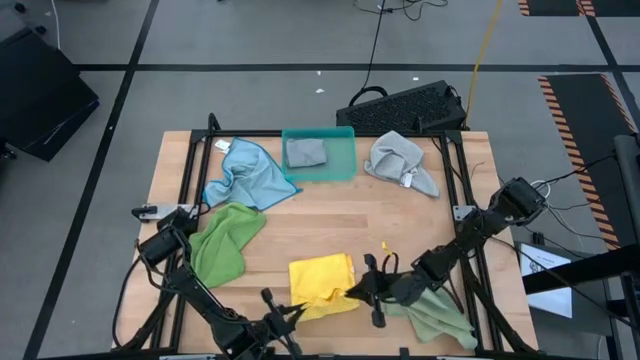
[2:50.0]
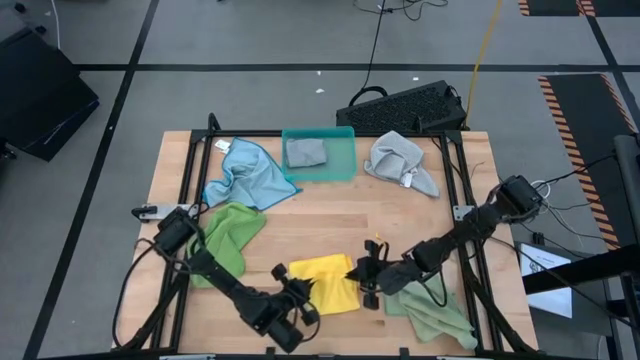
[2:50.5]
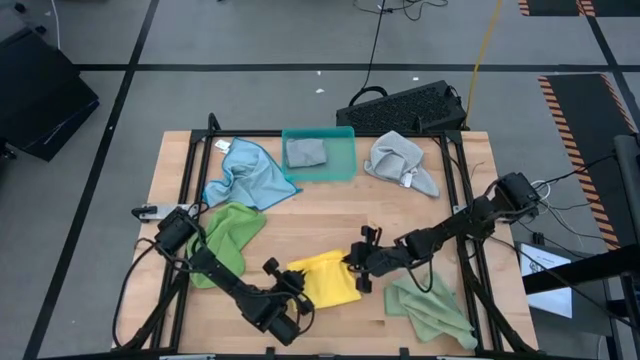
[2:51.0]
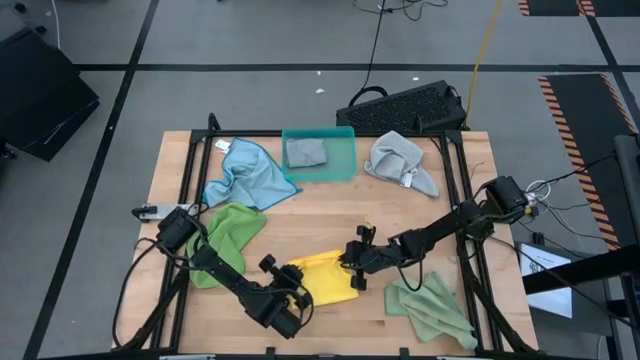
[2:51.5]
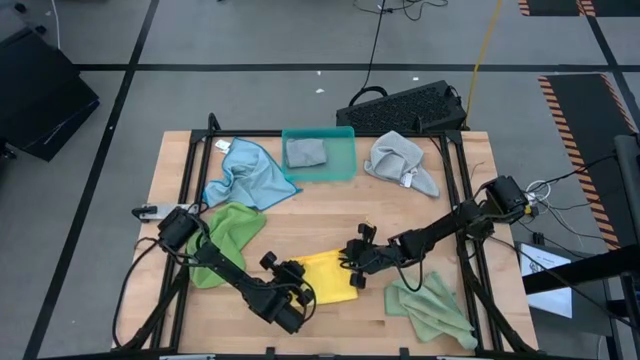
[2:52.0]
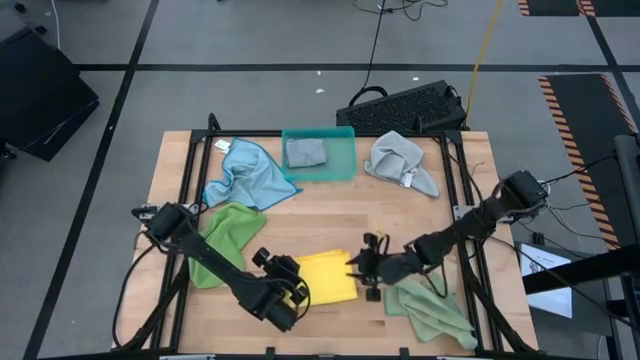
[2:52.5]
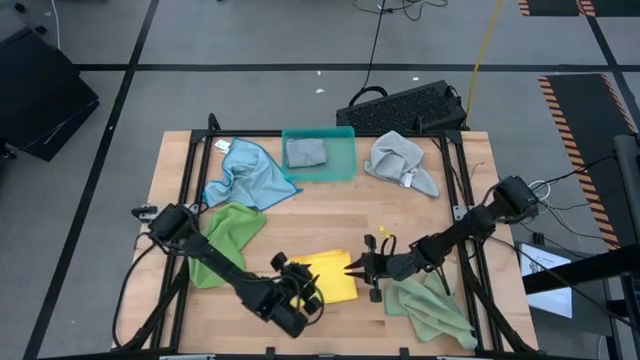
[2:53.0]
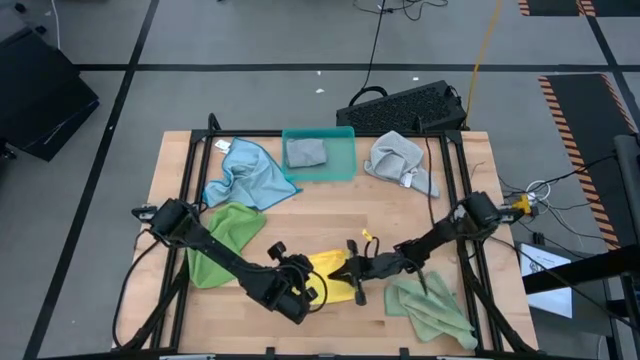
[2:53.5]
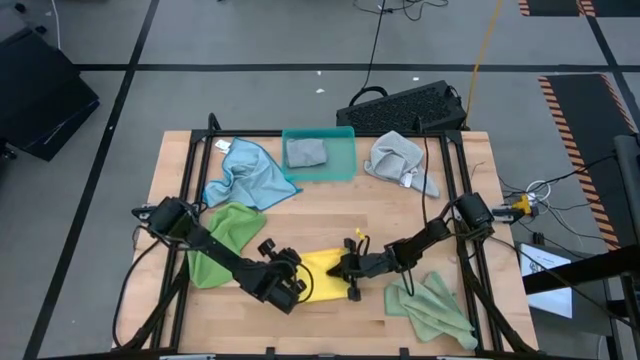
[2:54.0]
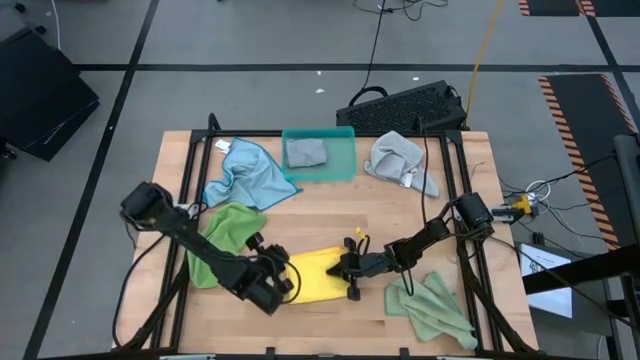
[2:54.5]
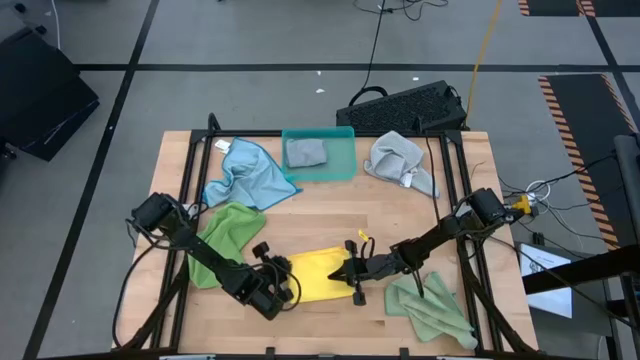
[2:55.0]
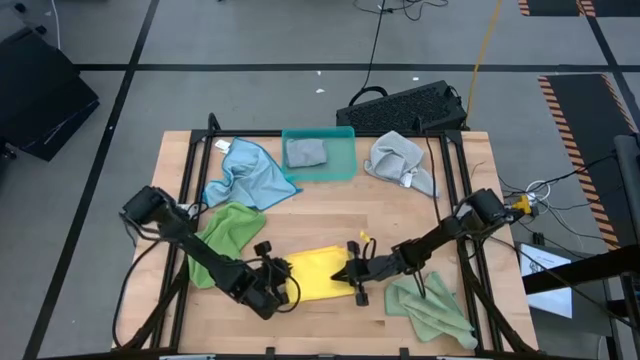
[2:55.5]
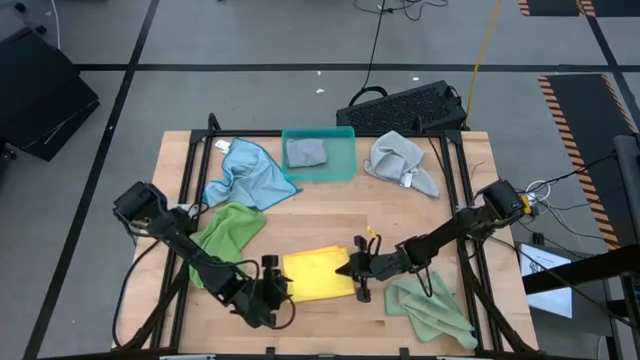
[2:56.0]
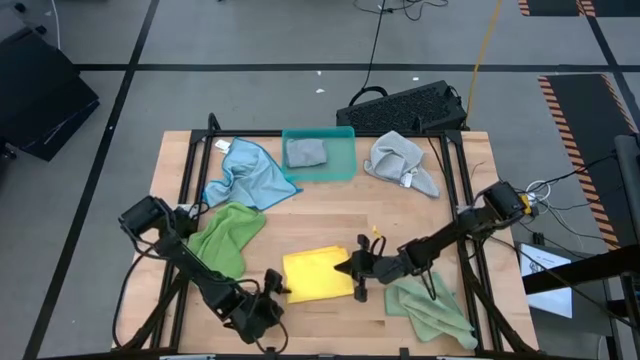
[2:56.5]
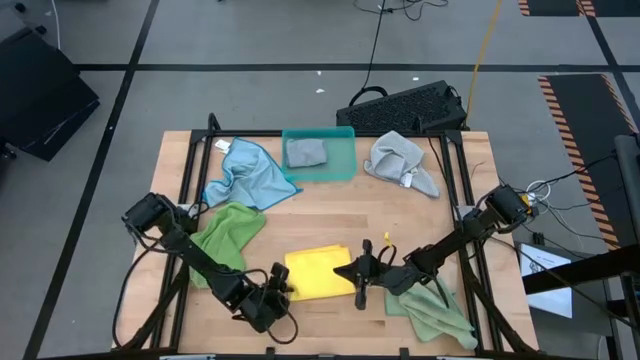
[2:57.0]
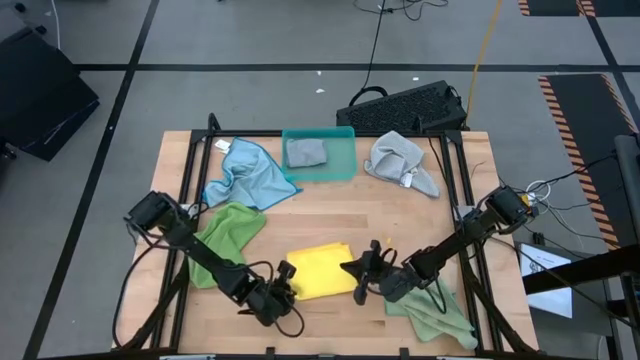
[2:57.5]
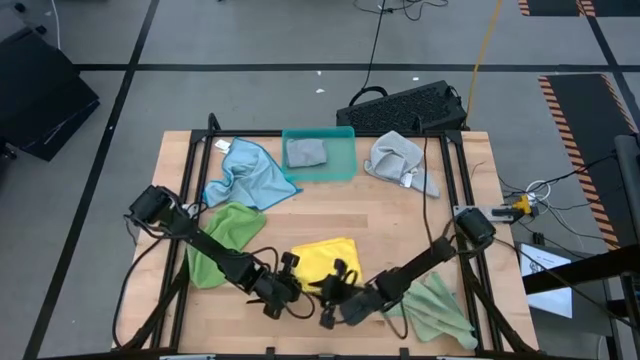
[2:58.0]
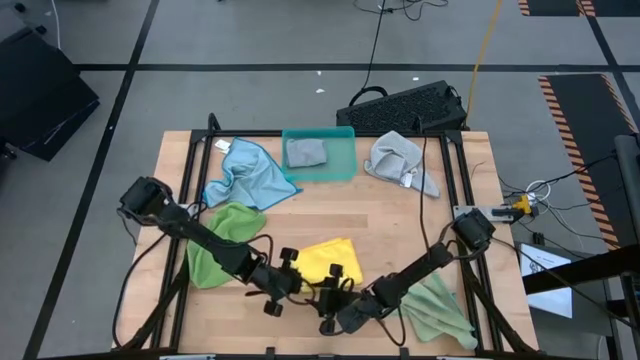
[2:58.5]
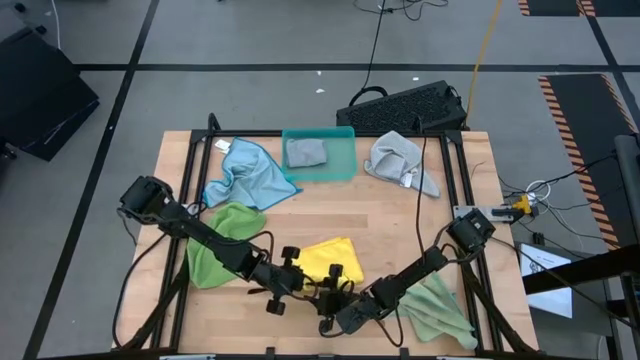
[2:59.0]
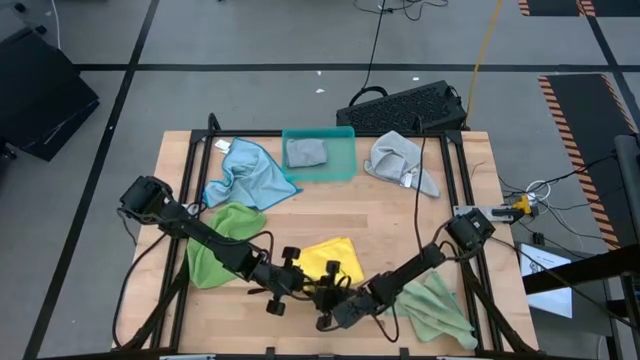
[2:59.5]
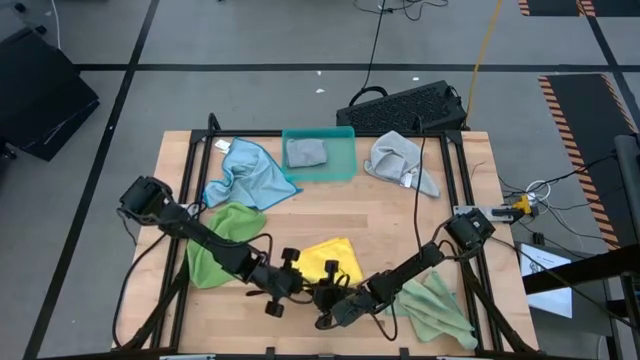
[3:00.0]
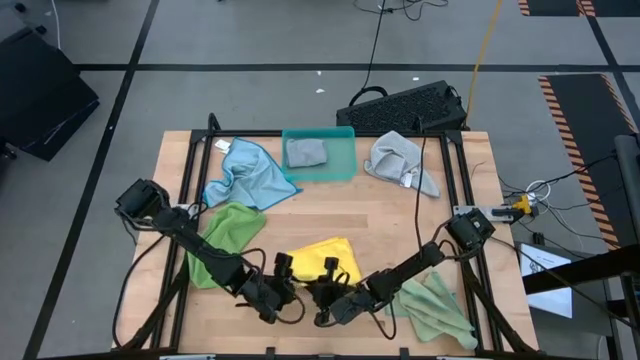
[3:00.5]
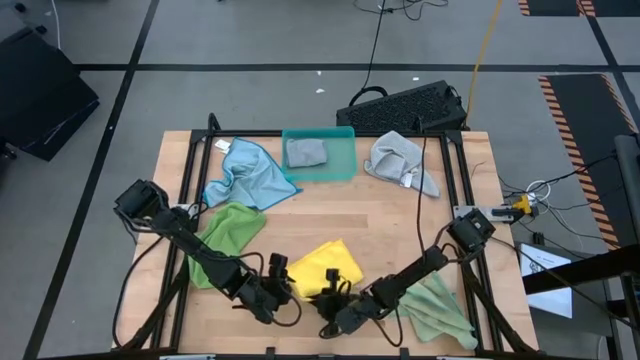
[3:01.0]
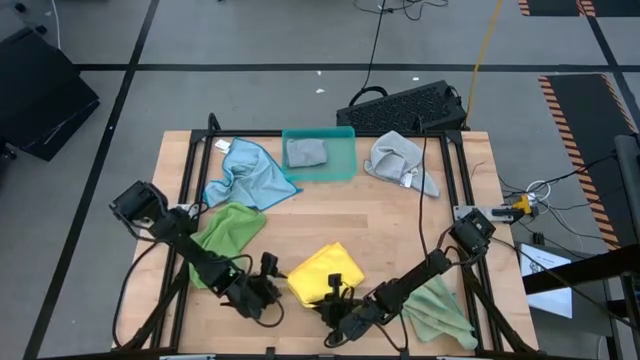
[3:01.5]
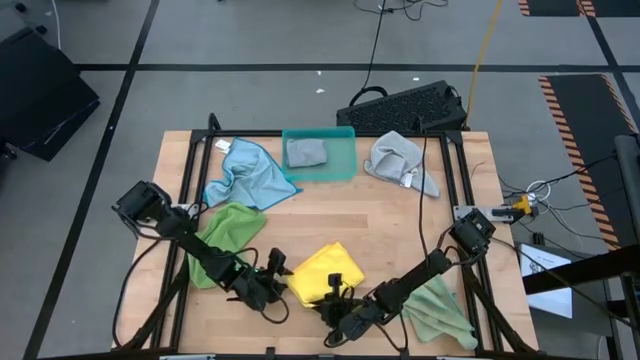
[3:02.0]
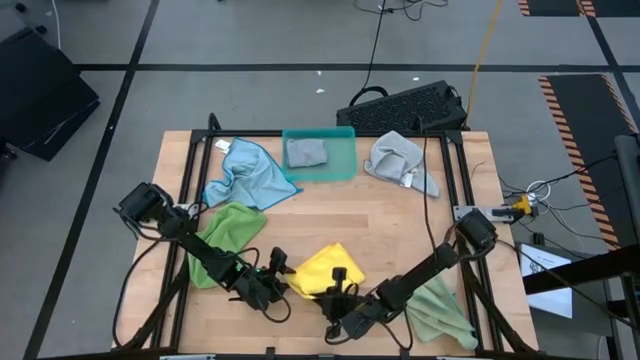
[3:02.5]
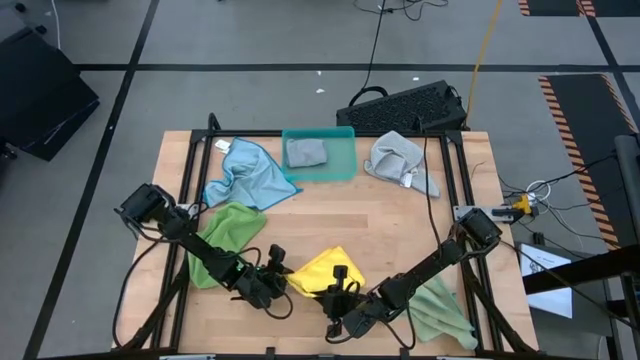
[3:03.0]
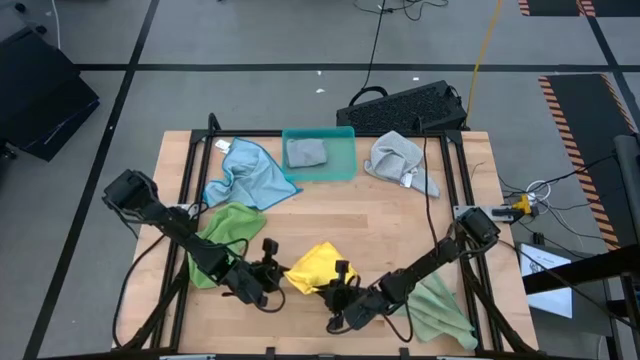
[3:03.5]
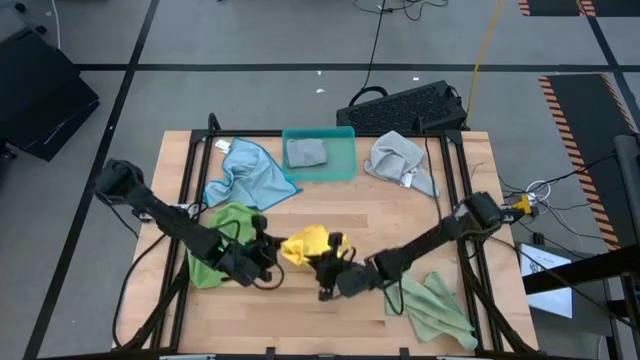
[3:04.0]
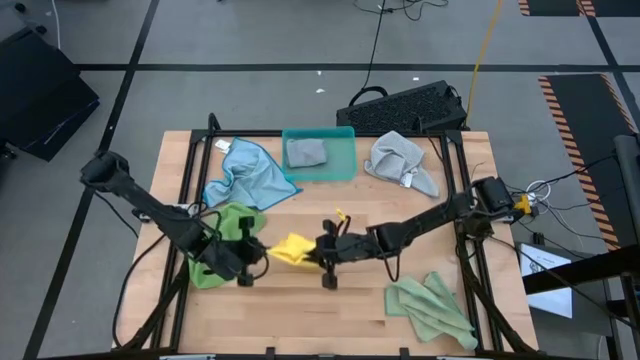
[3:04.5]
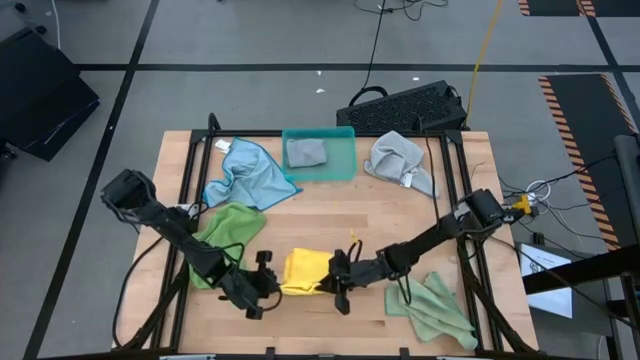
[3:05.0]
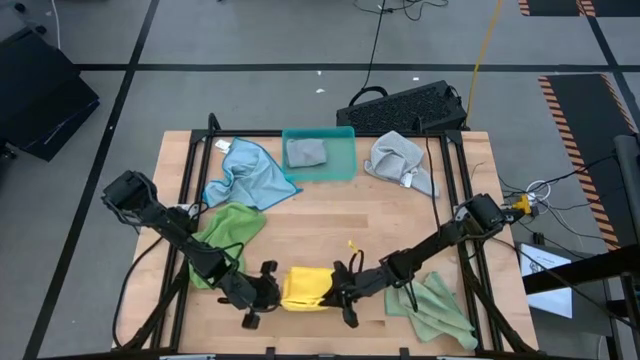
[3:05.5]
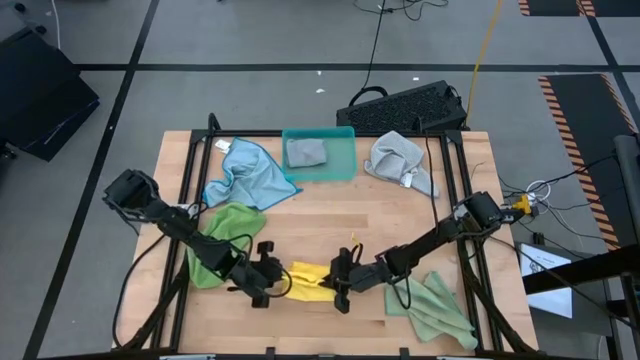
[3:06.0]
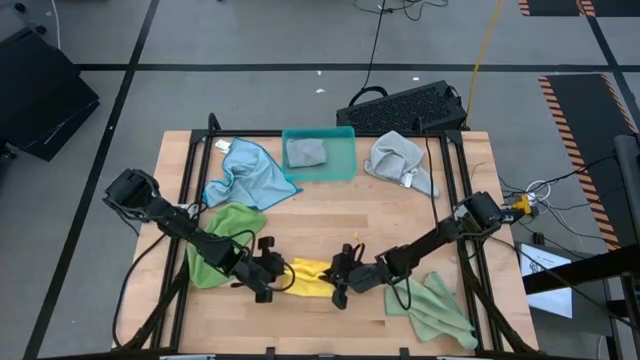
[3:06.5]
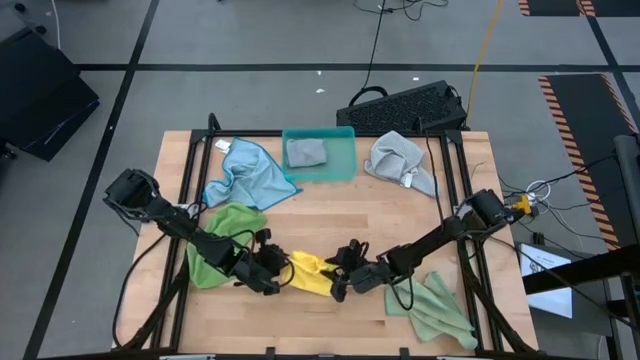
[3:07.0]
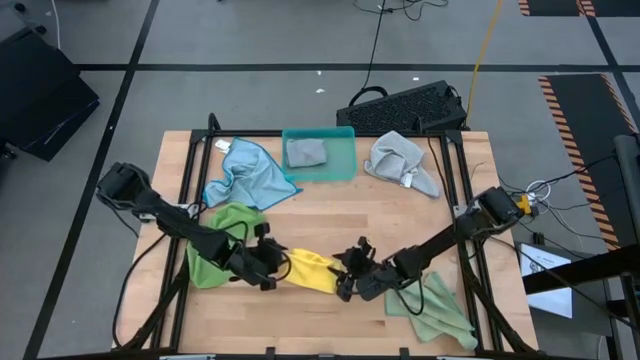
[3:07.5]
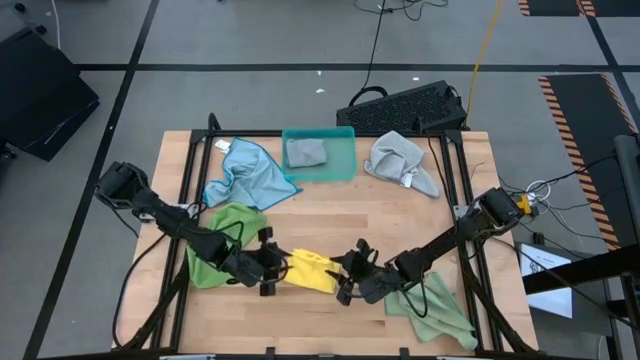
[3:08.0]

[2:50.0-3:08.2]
Task: Fold microfiber towels
Fold the yellow microfiber cloth

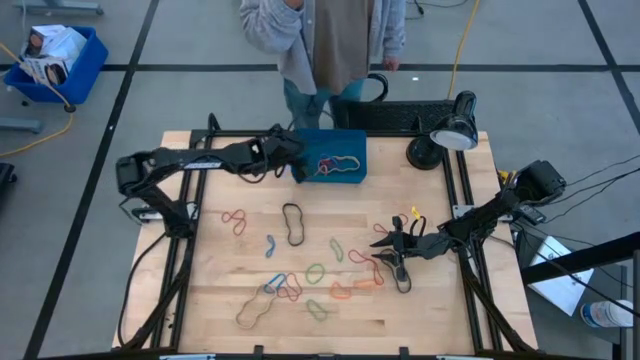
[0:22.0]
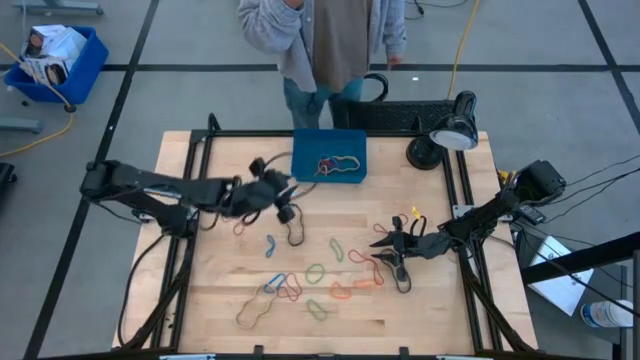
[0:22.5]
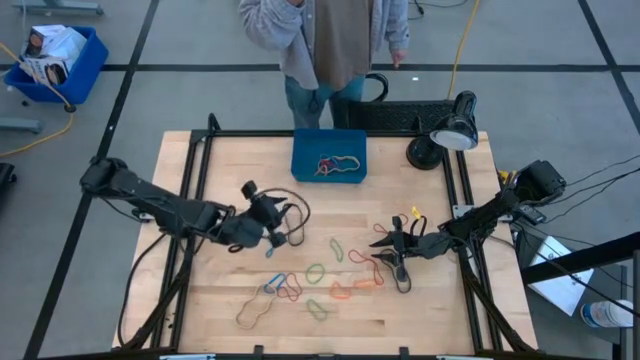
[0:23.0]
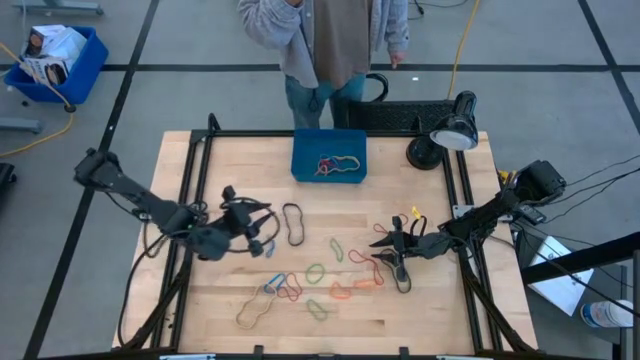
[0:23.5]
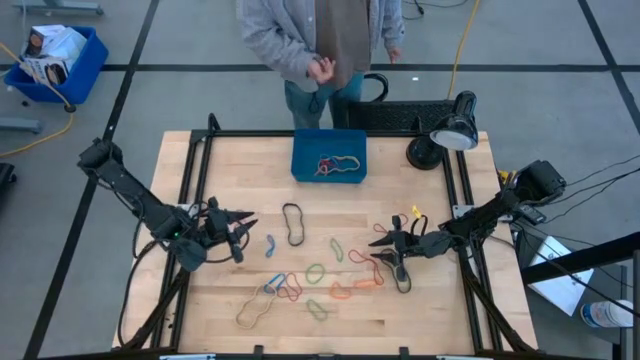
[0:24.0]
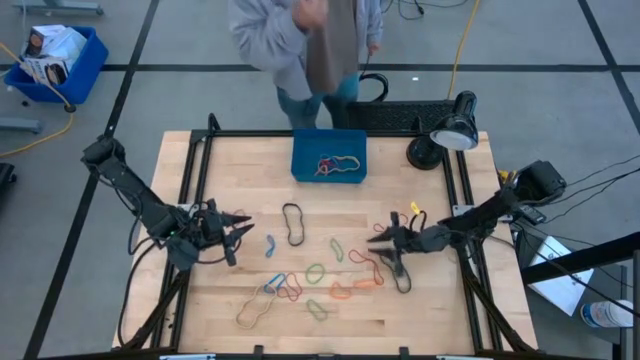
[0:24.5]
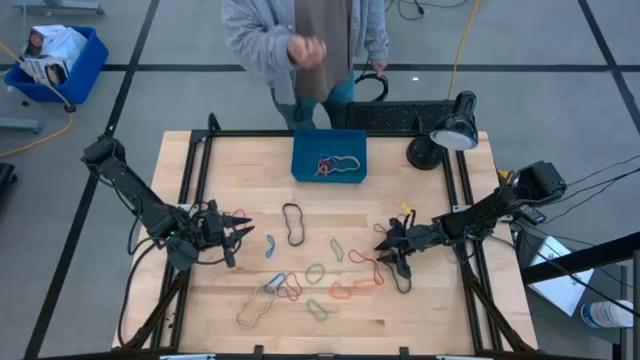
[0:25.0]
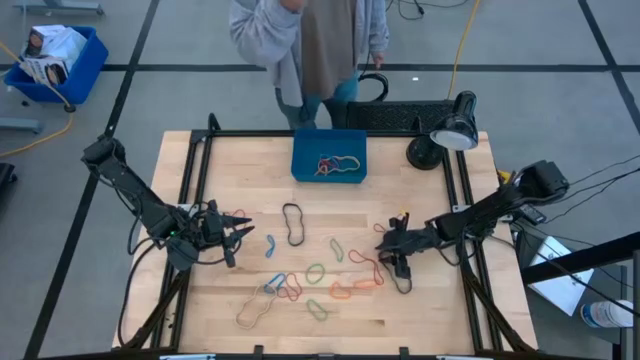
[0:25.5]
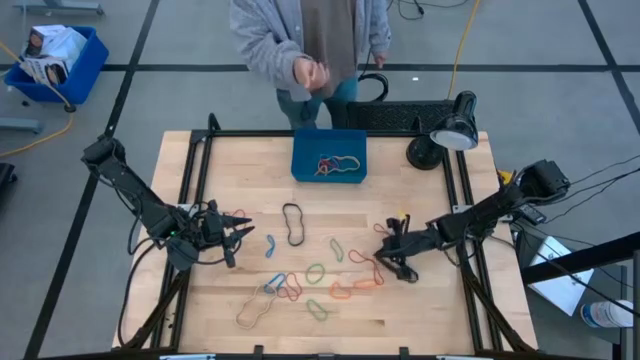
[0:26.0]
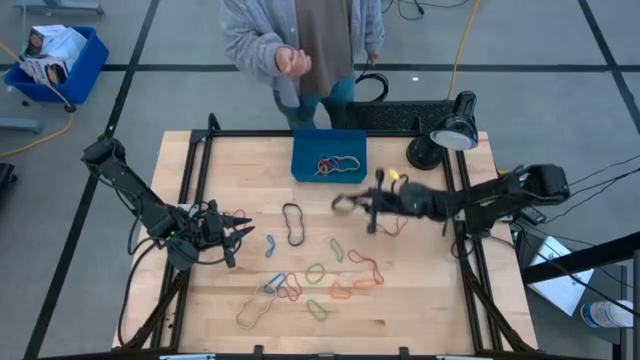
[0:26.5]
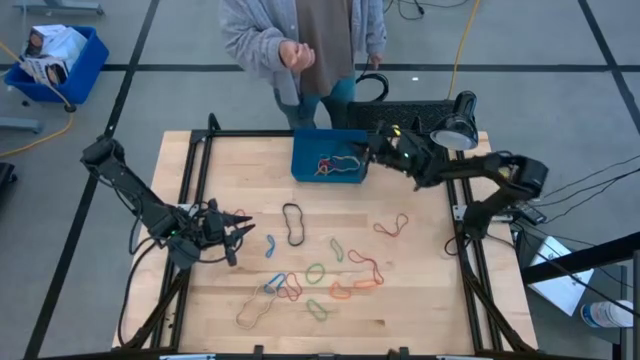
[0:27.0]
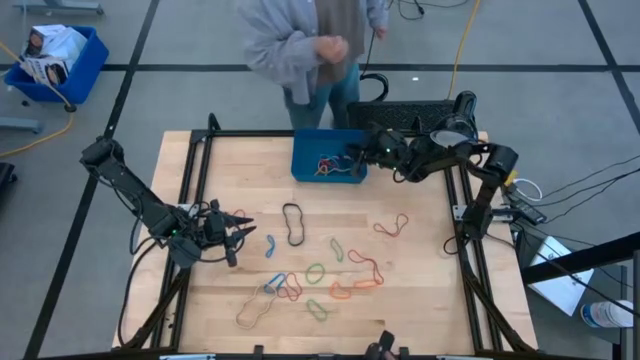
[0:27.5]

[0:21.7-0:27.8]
Task: Pick and place rubber bands into bin
Put the black rubber band into the blue bin
